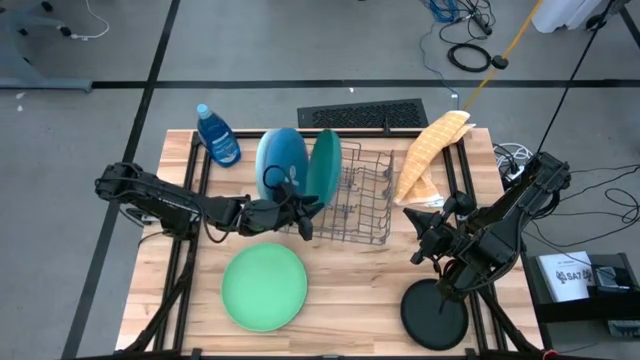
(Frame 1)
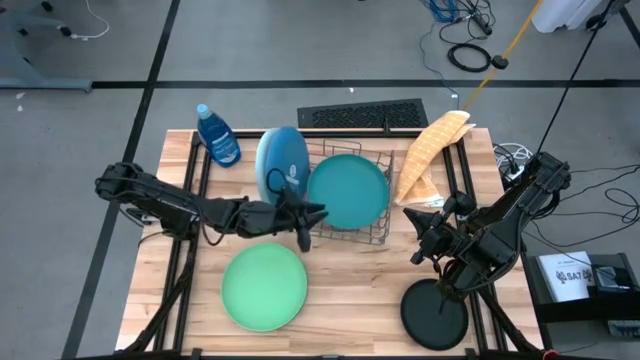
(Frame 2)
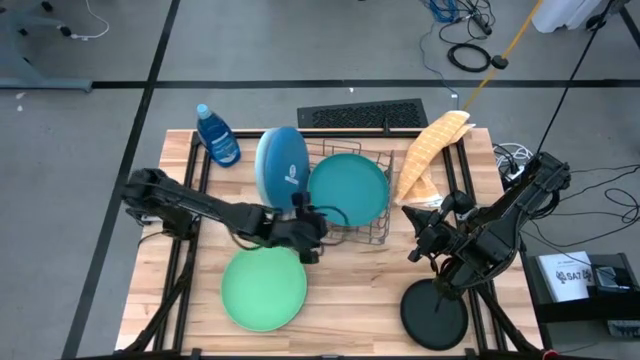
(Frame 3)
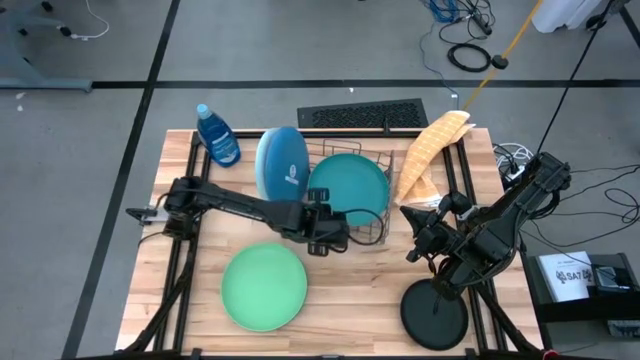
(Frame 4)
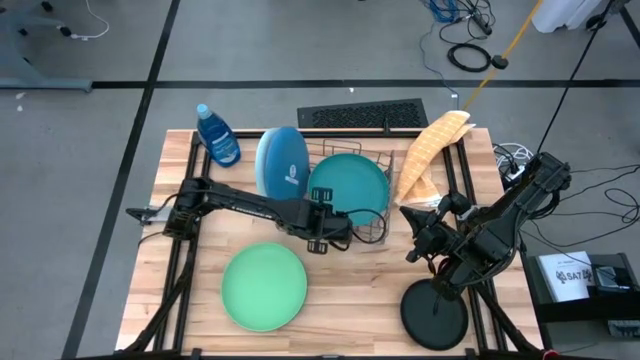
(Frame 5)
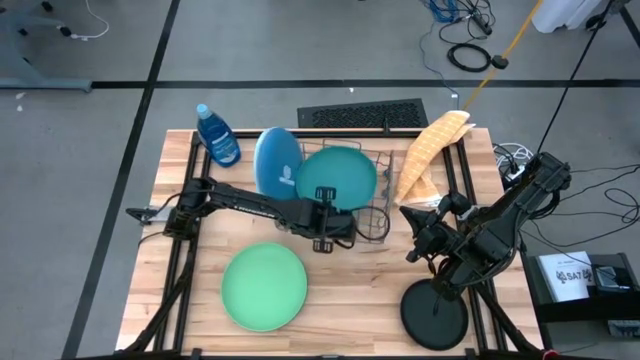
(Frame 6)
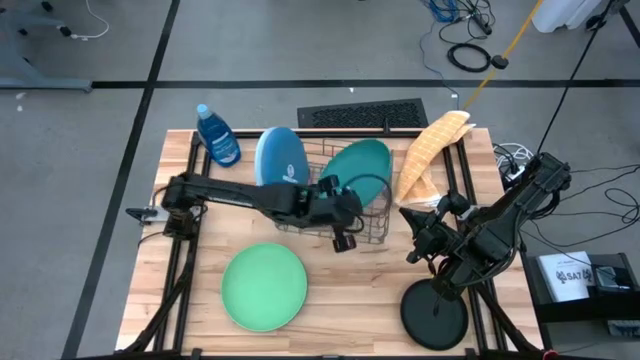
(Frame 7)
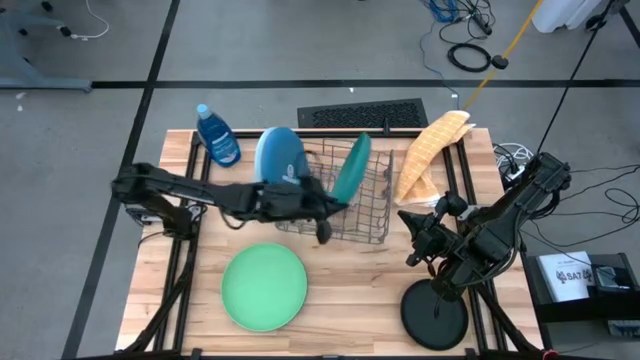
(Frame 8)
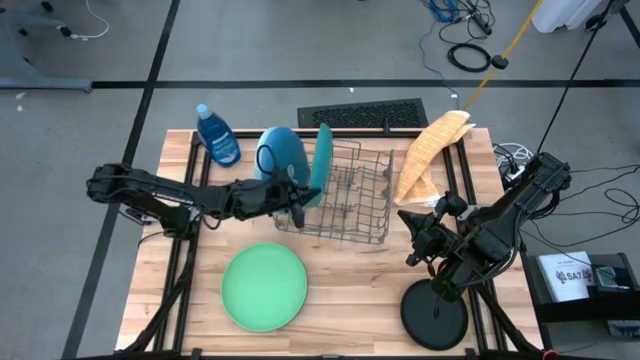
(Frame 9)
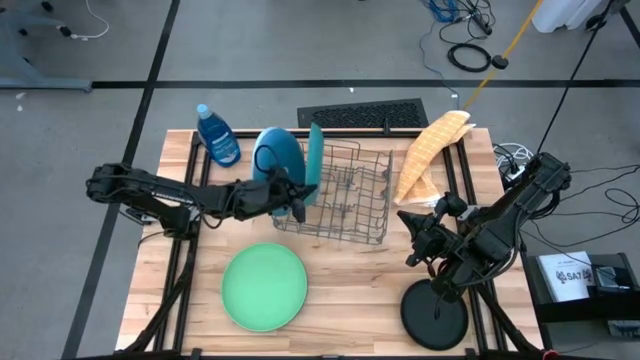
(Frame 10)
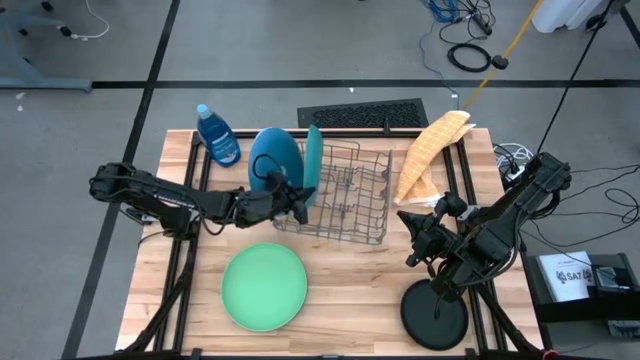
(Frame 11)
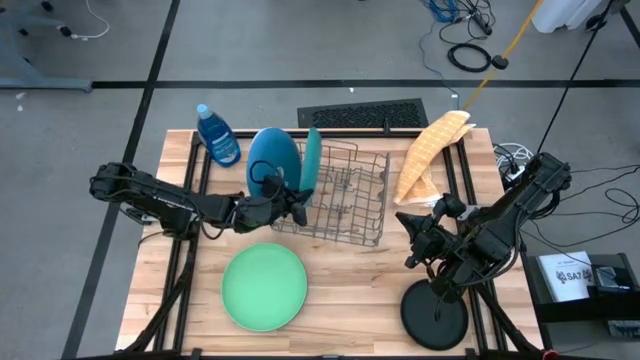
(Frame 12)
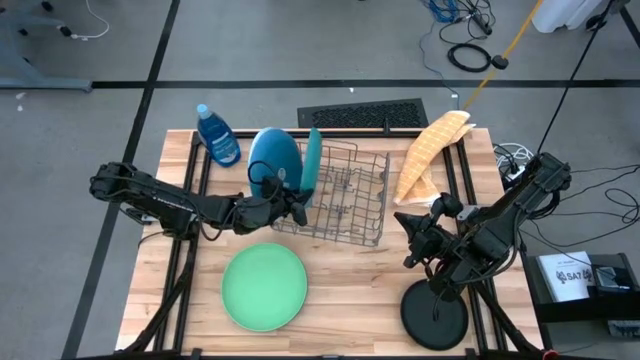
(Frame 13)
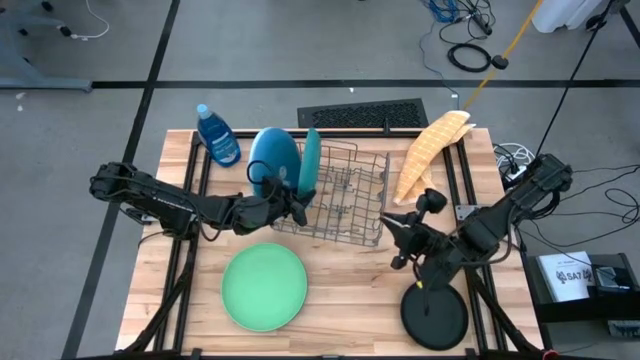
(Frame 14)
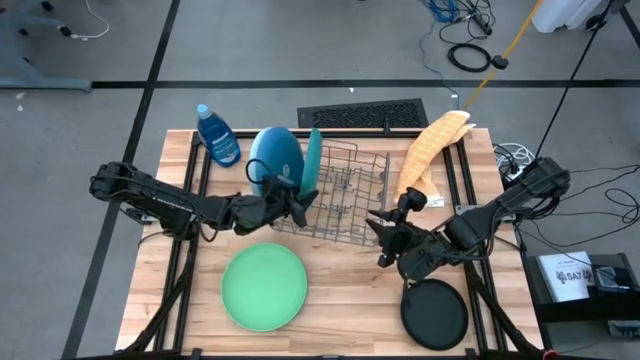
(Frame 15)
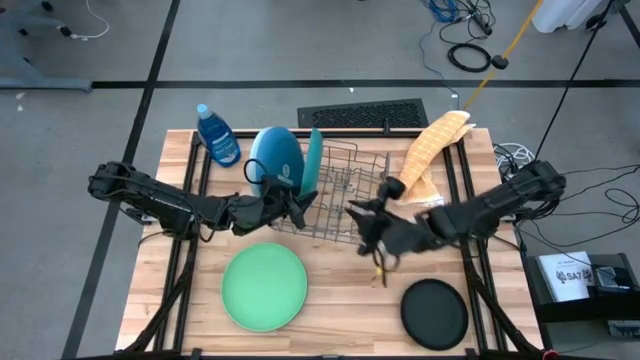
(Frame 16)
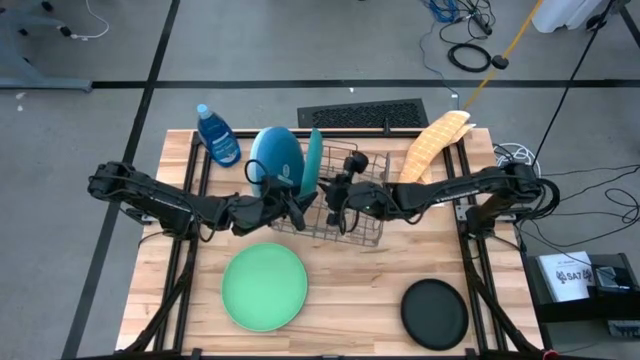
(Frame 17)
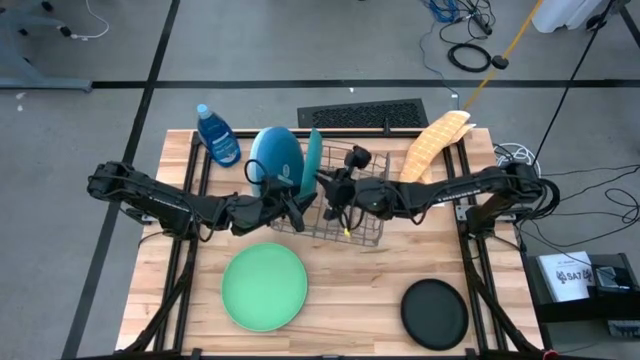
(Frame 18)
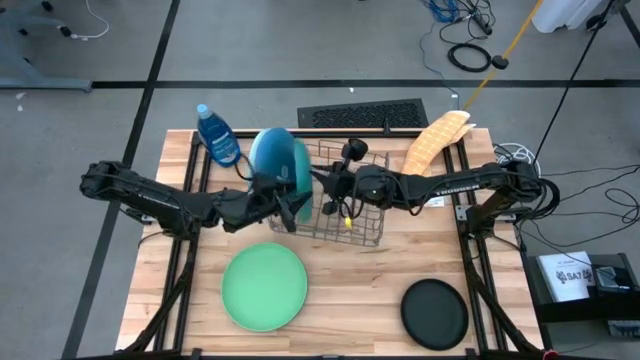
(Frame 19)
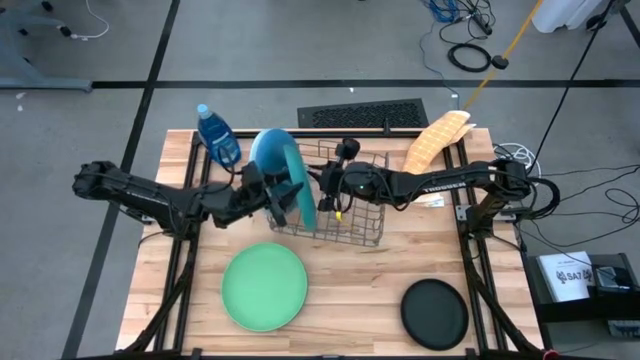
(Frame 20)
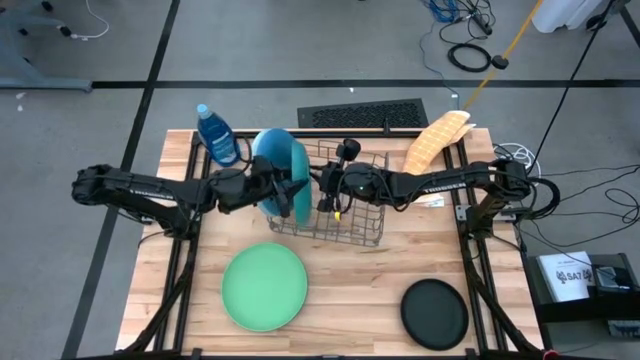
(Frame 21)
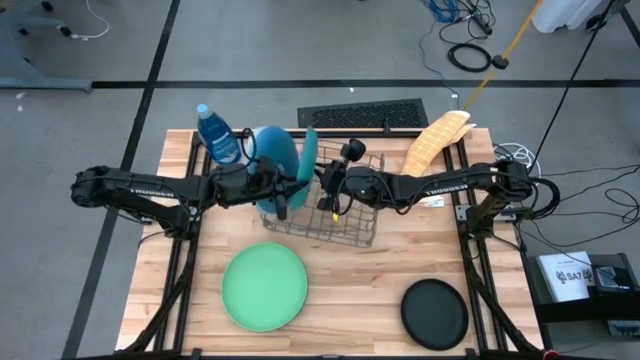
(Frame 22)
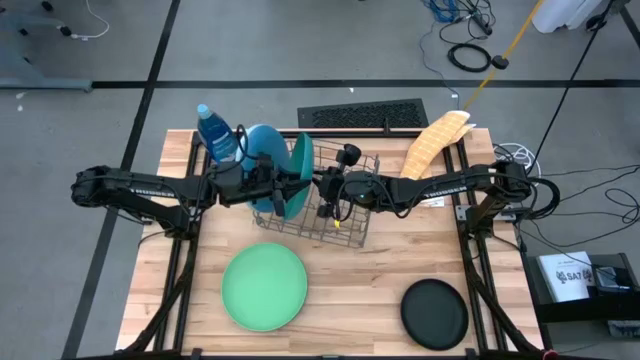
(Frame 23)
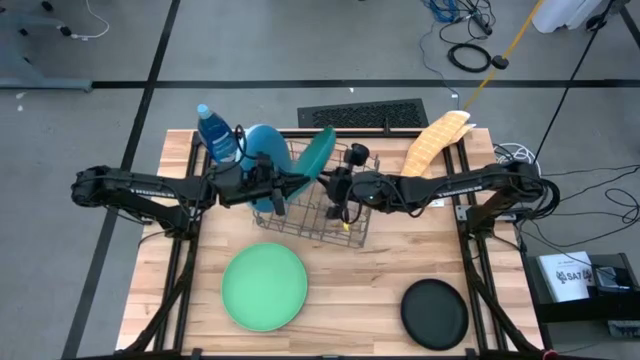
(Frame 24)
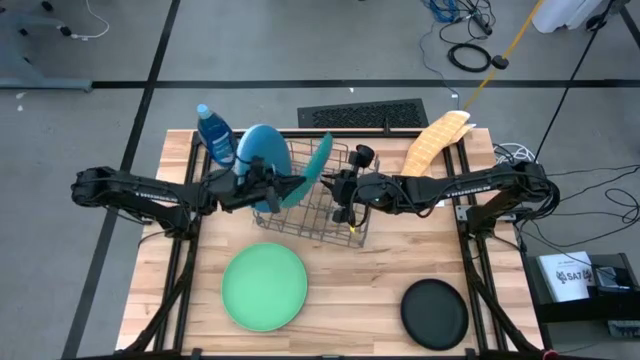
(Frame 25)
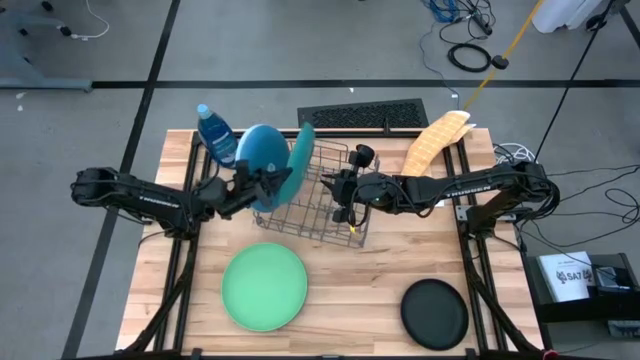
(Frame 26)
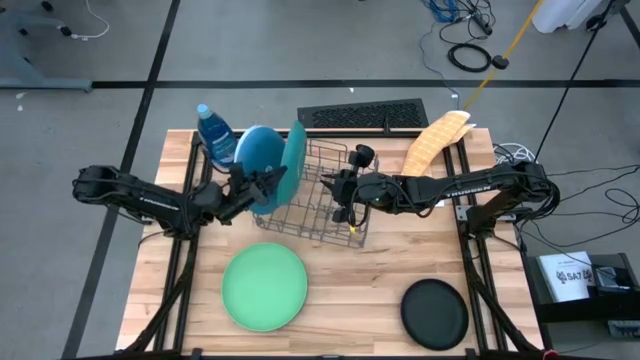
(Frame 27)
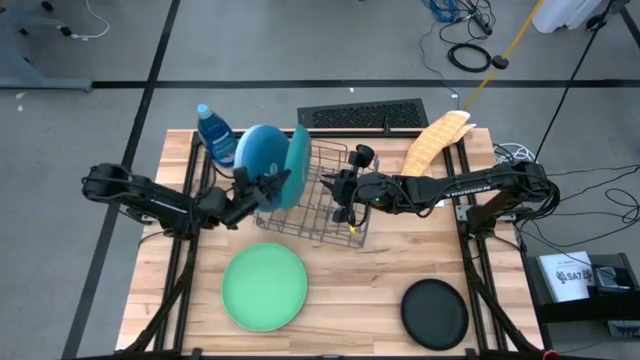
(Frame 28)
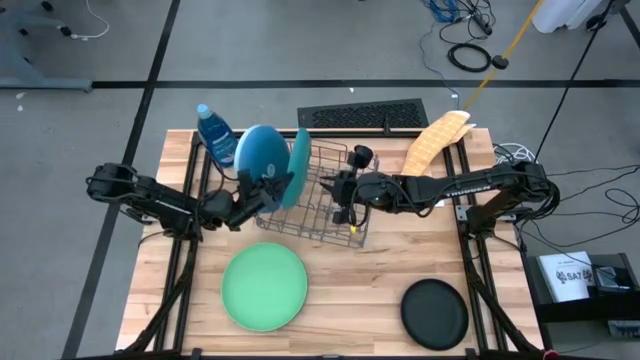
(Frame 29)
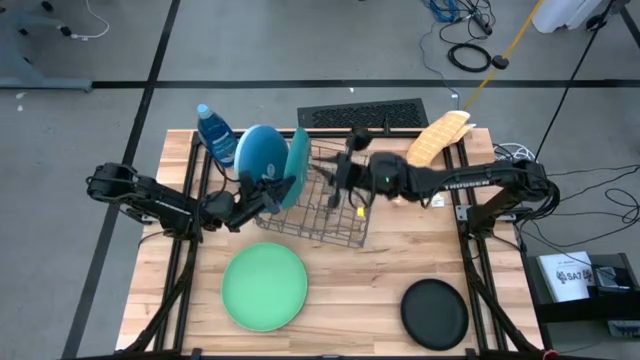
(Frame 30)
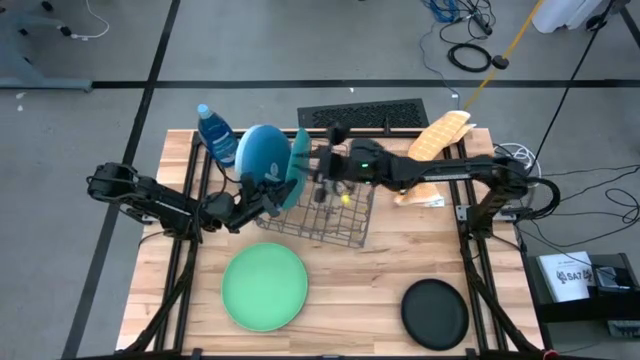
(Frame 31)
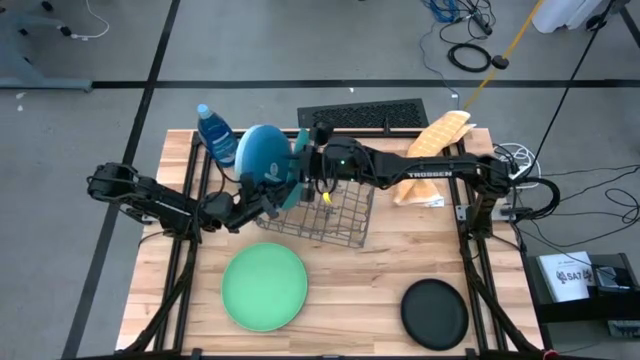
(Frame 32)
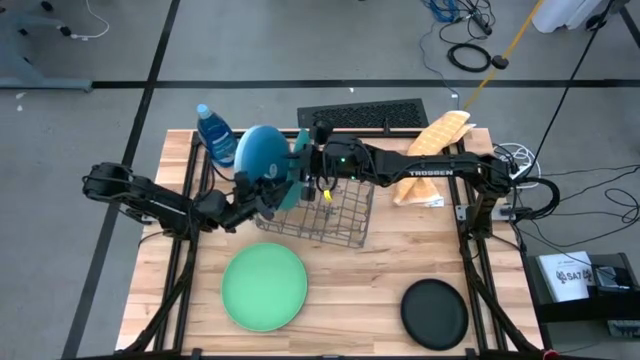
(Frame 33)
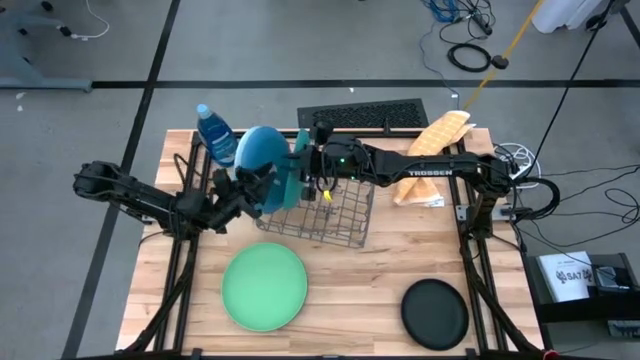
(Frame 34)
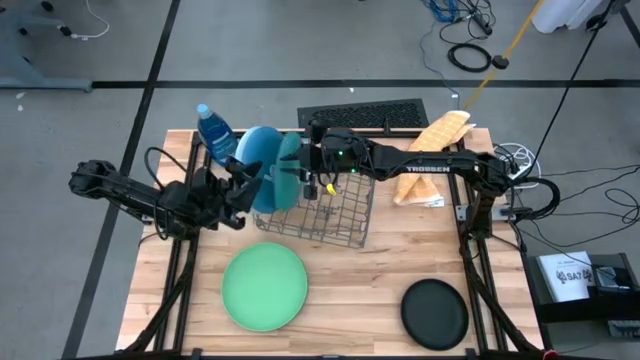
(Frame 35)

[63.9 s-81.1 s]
Task: Sort dishes
Put the green plate into the dish rack

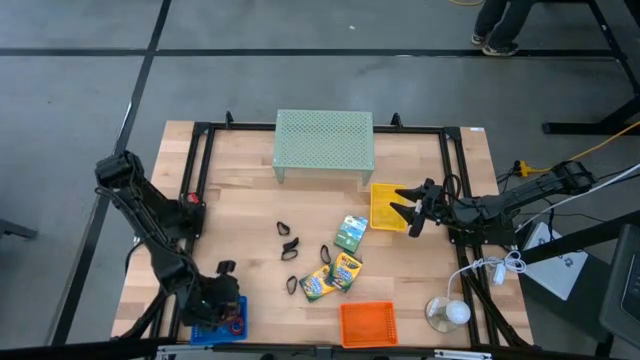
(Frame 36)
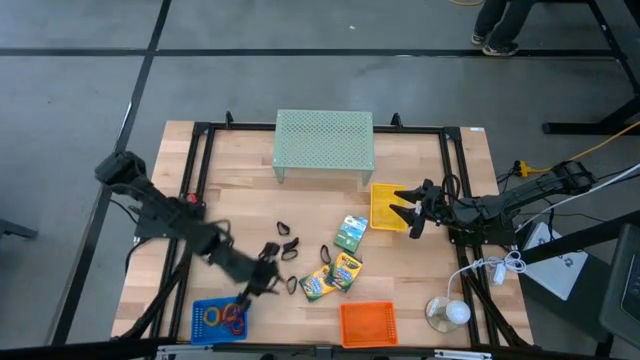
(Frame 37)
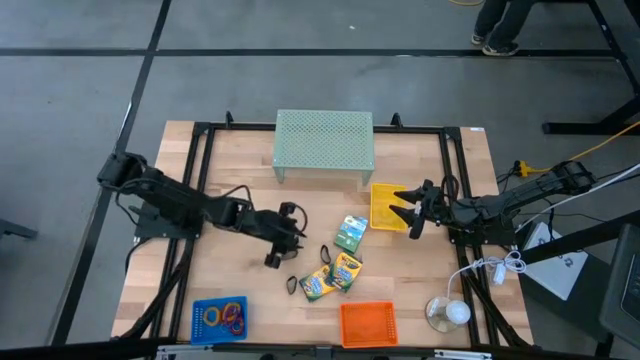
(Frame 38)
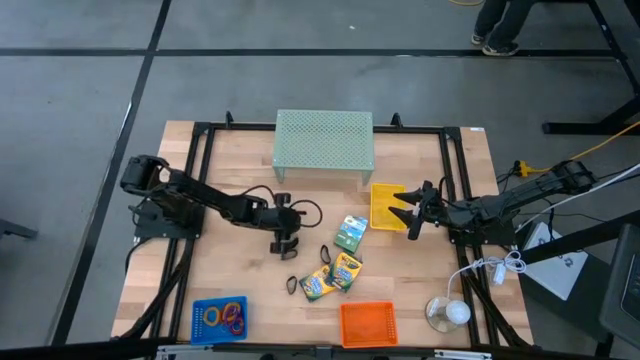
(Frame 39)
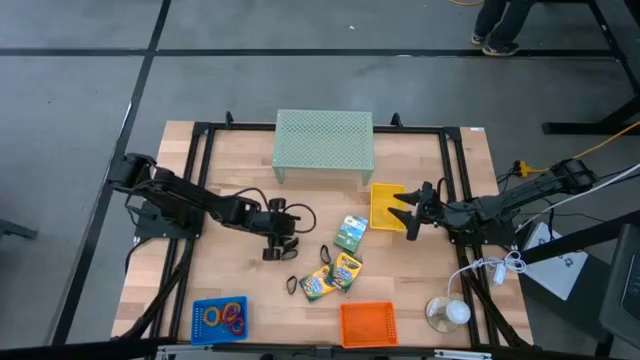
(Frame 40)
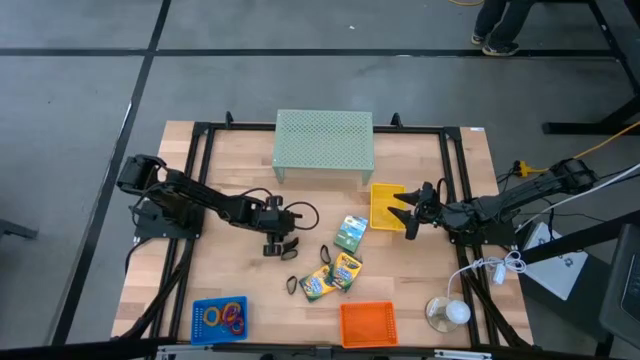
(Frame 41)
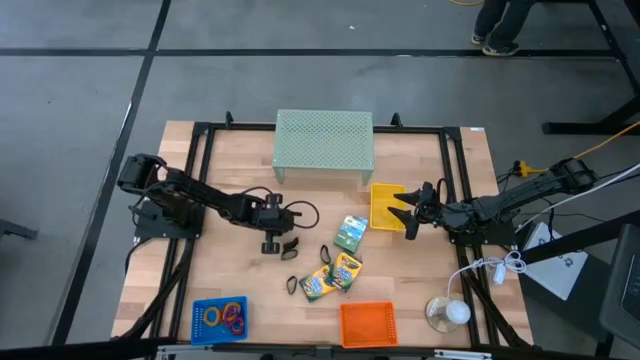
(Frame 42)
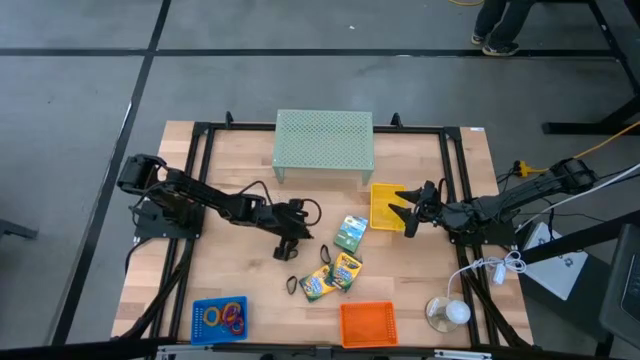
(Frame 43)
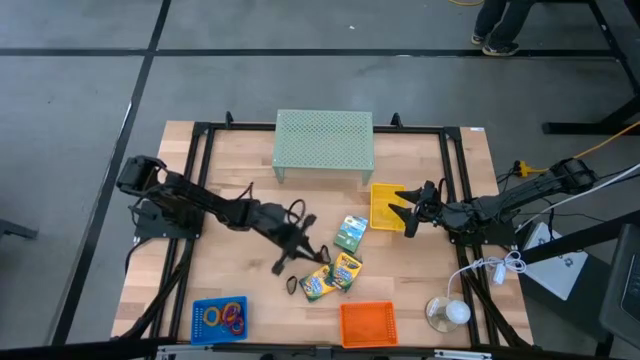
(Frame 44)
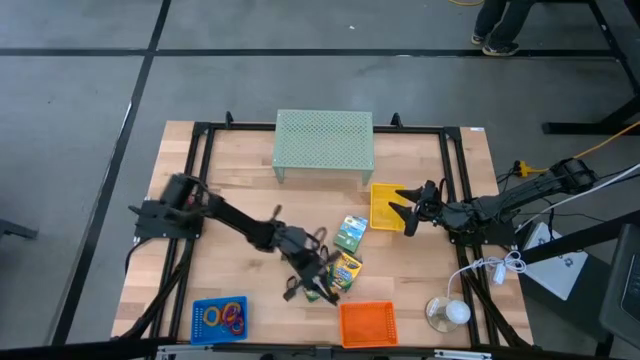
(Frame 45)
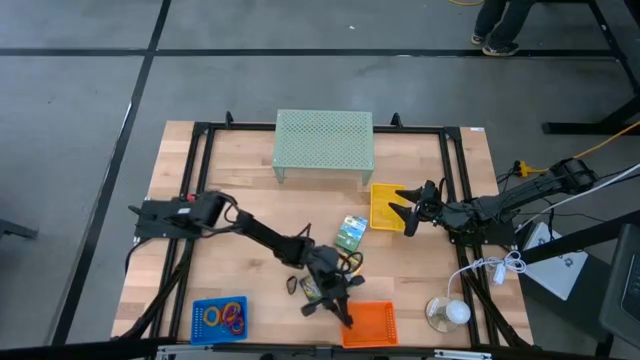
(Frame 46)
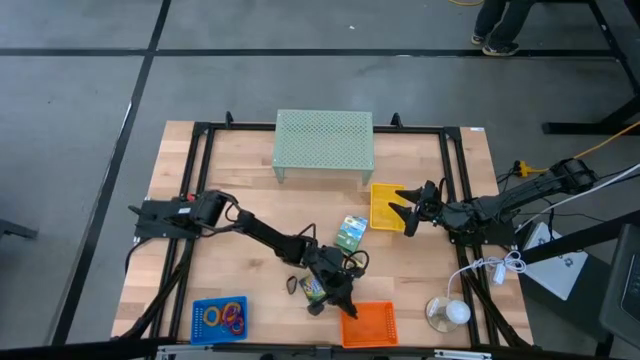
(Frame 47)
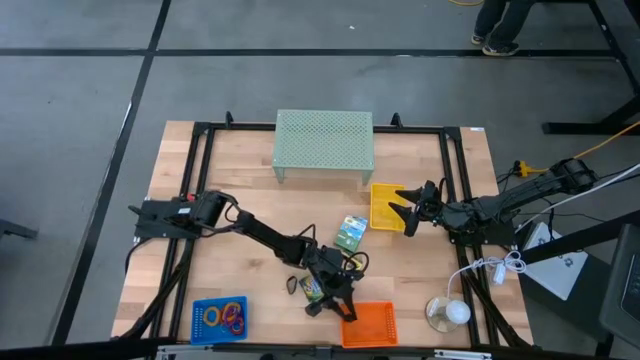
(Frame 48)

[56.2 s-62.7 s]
Task: Pick & Place Office Desk Supplies
Put the black rubber band into the orange bin
